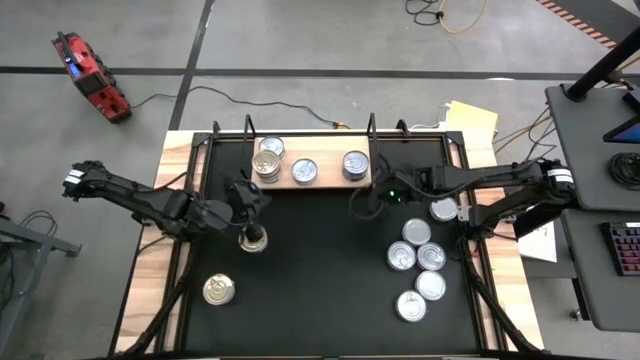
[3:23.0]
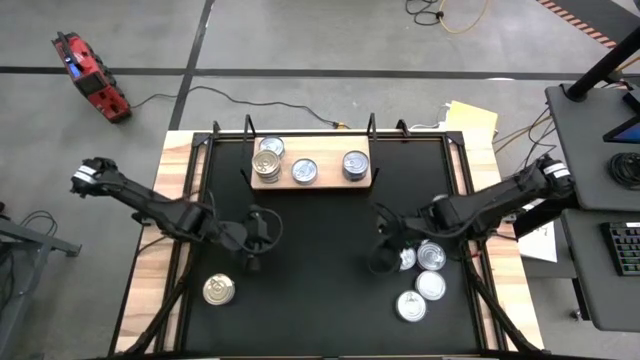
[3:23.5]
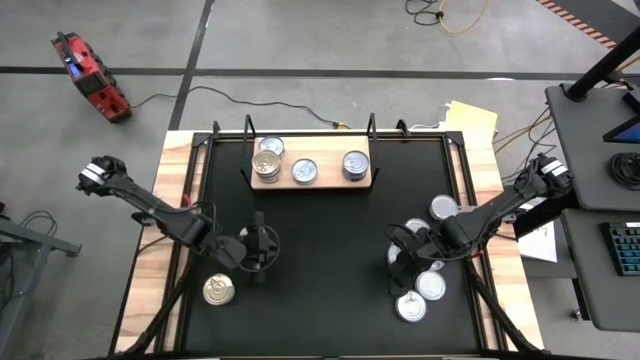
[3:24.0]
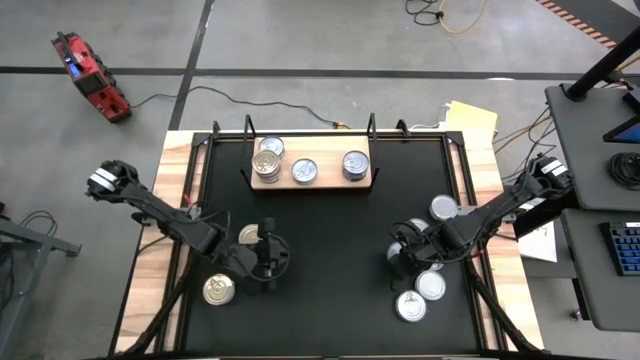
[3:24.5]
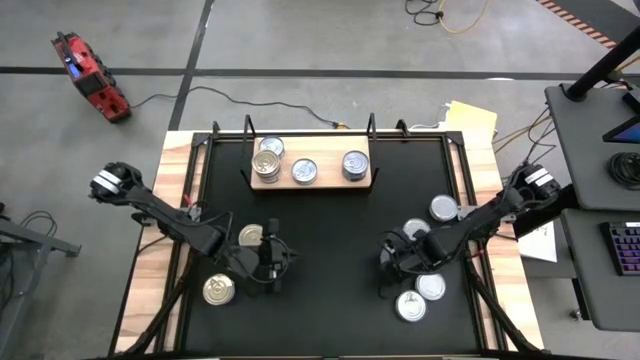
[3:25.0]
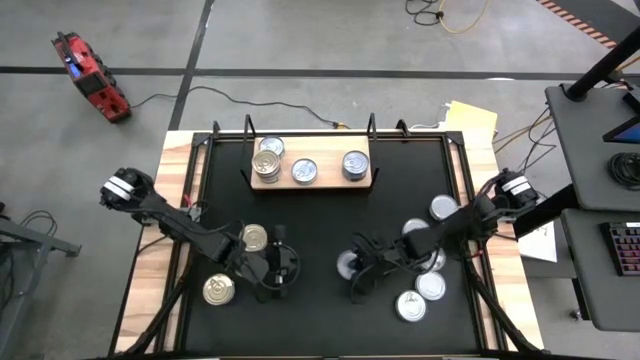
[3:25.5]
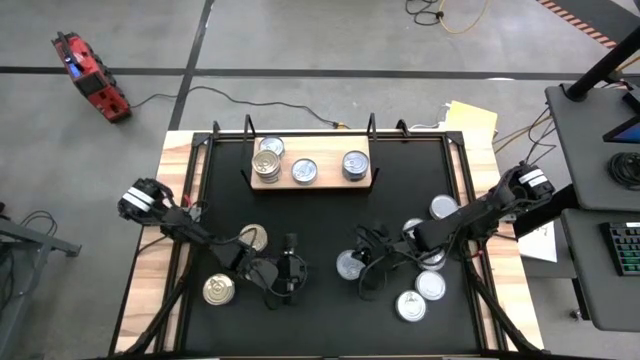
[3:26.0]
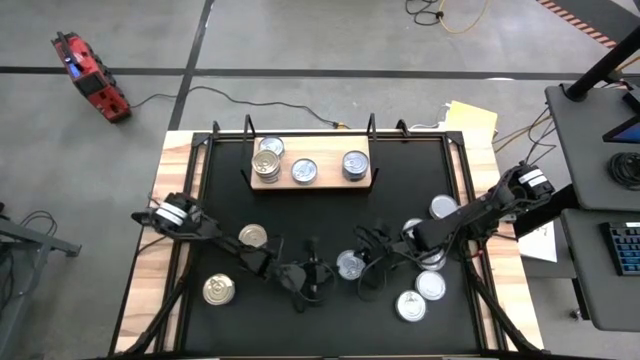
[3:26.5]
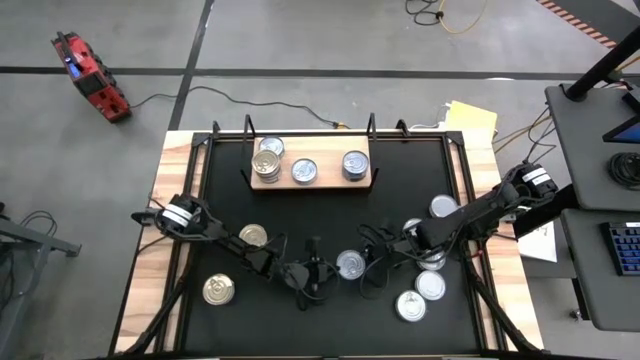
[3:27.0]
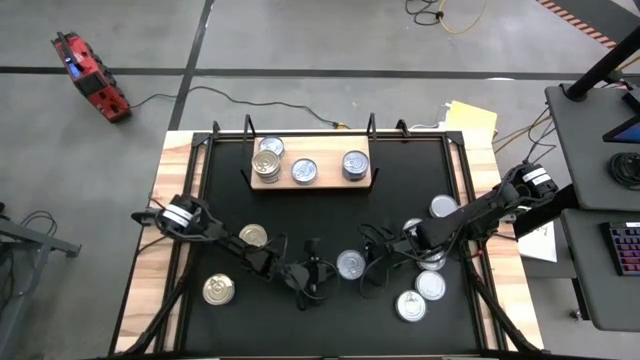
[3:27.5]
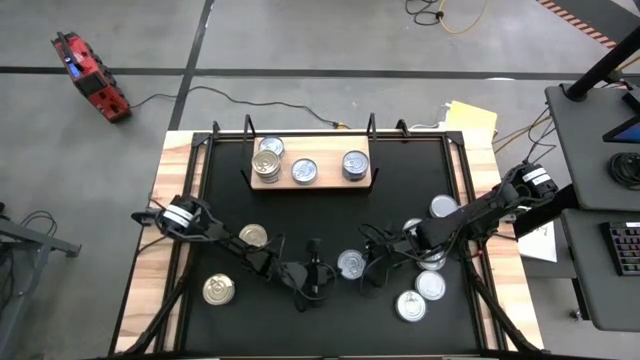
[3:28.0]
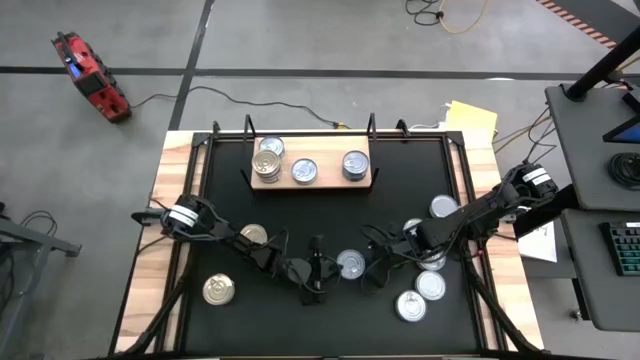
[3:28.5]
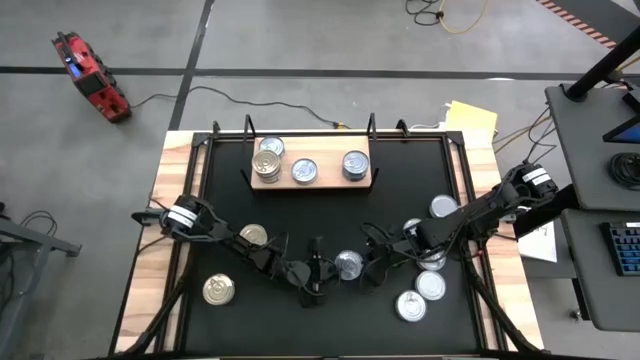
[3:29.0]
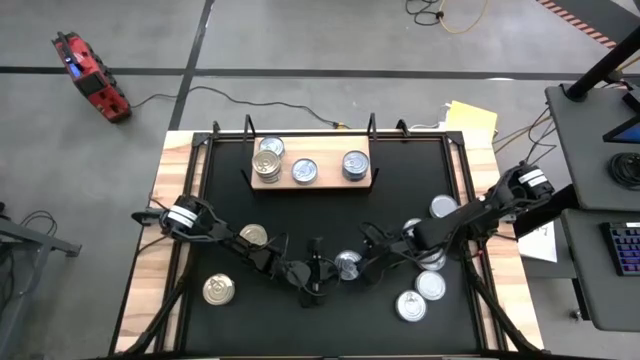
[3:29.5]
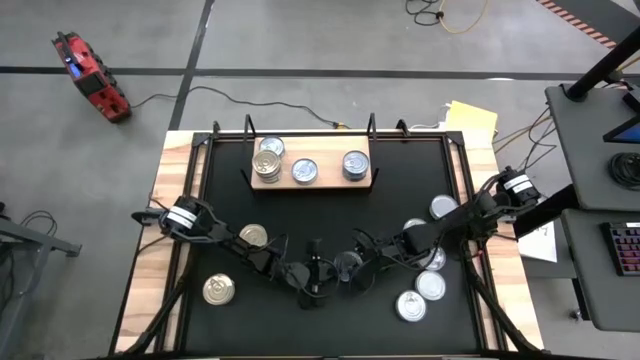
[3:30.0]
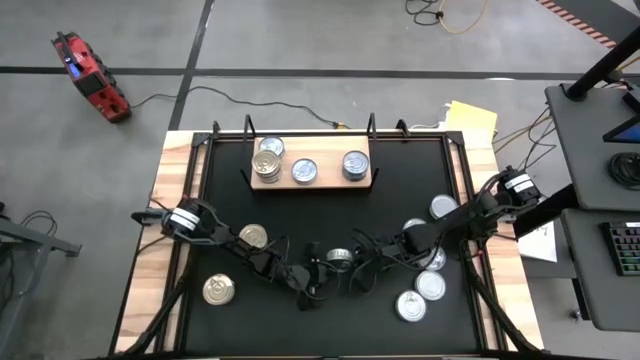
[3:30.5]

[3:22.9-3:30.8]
Task: Stack canned seafood by type on shelf
Put the green tuna can on the shelf

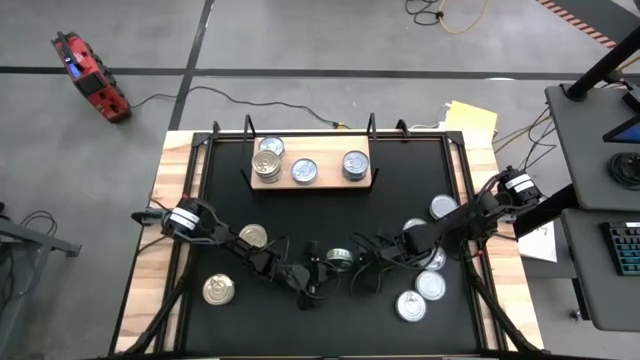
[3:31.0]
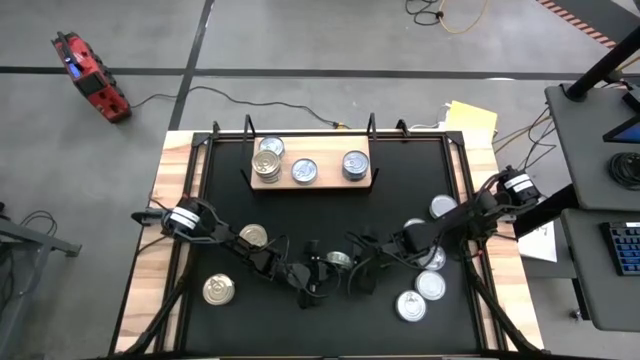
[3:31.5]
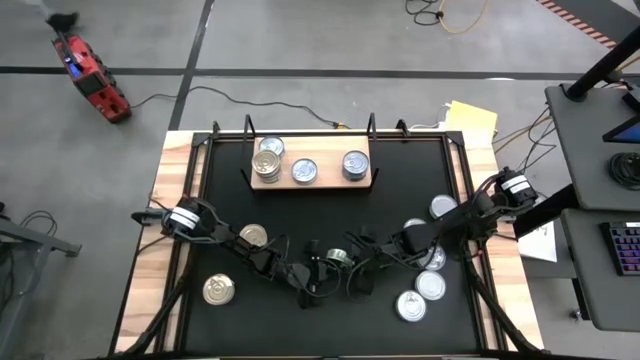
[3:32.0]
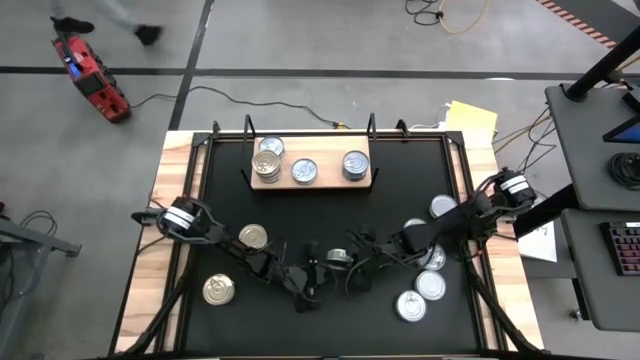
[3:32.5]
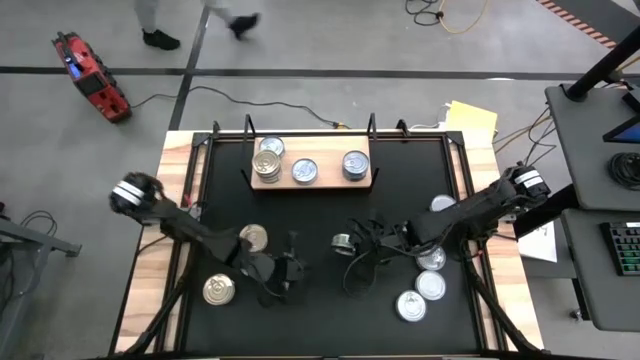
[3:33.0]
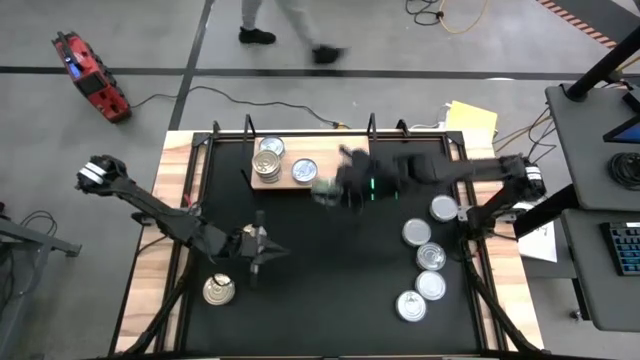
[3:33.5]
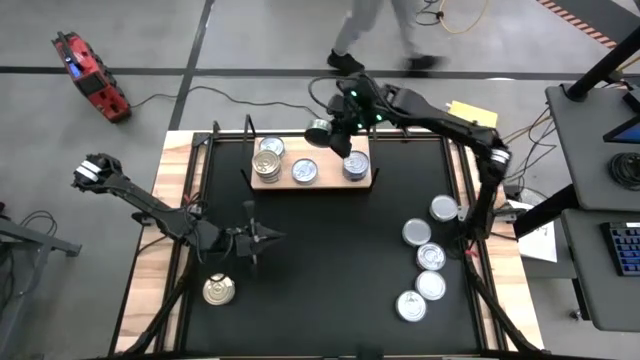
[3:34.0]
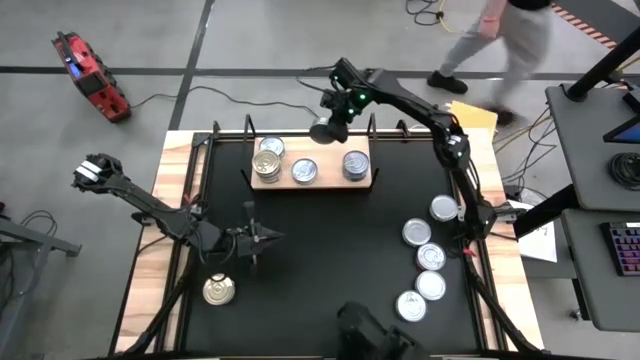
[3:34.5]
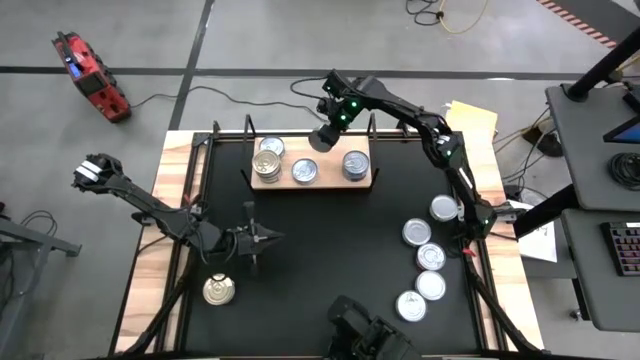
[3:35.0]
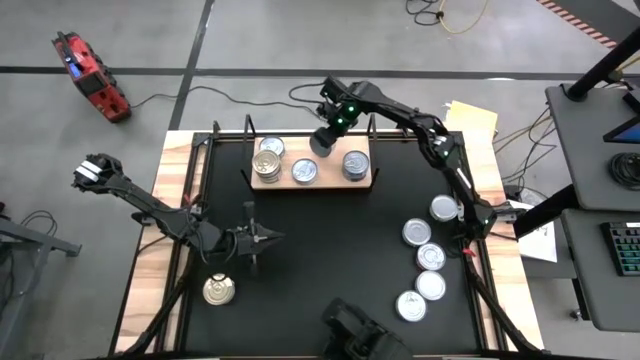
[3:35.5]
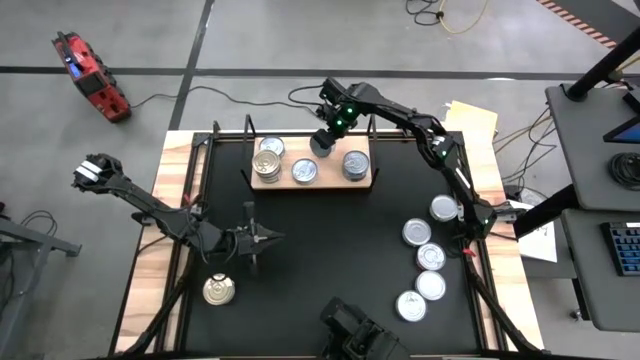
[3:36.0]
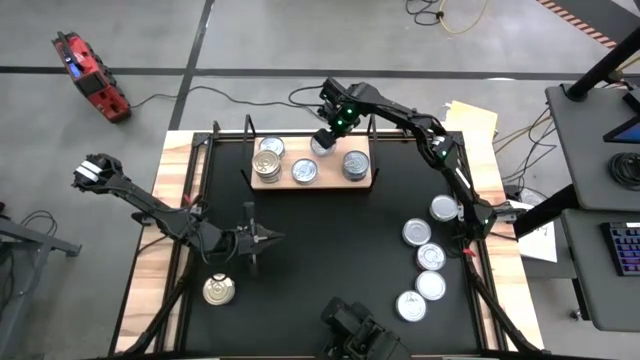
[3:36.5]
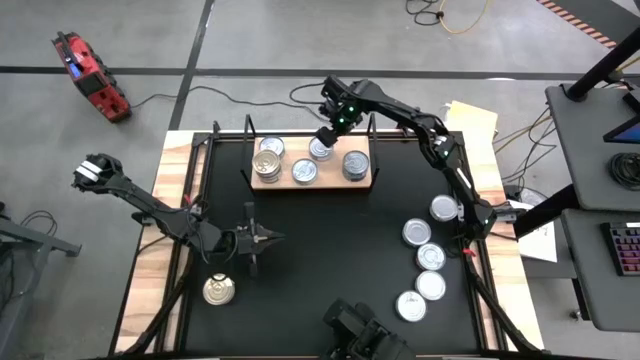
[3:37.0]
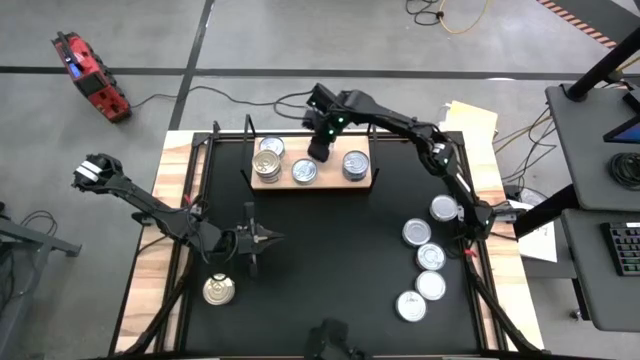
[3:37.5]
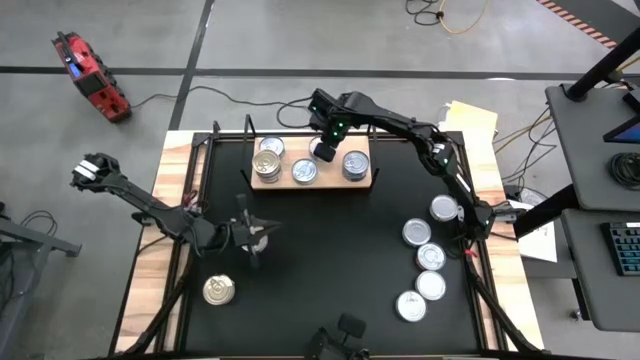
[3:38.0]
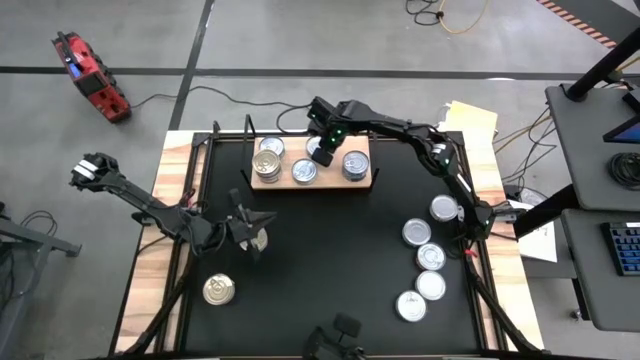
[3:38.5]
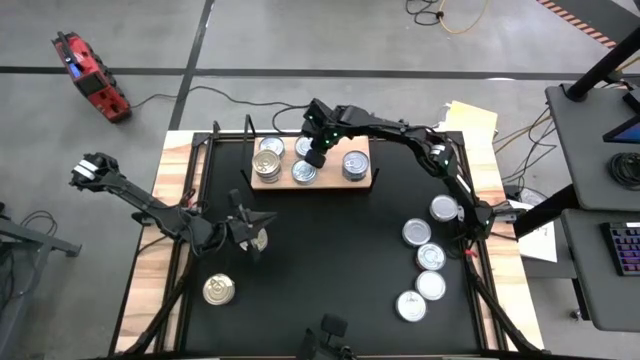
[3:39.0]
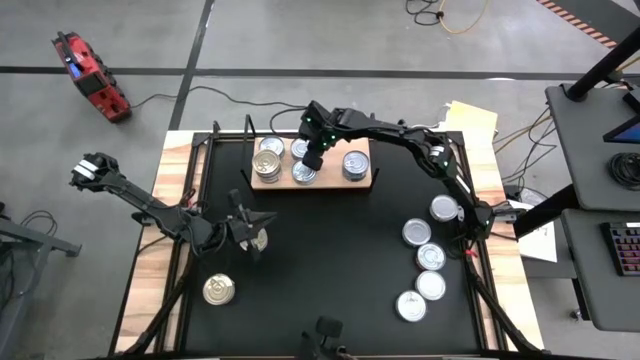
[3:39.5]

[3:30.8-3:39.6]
Put the green tuna can on the shelf

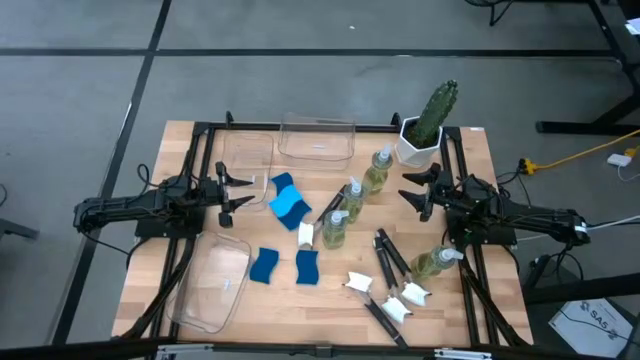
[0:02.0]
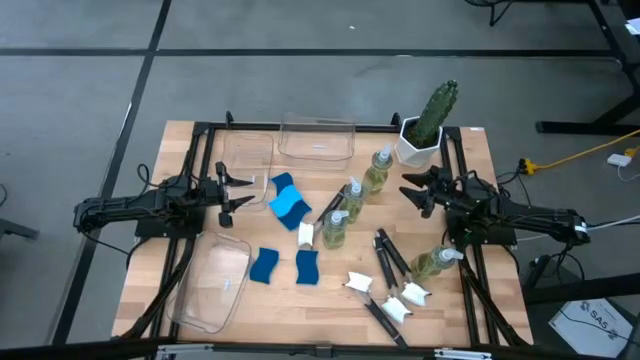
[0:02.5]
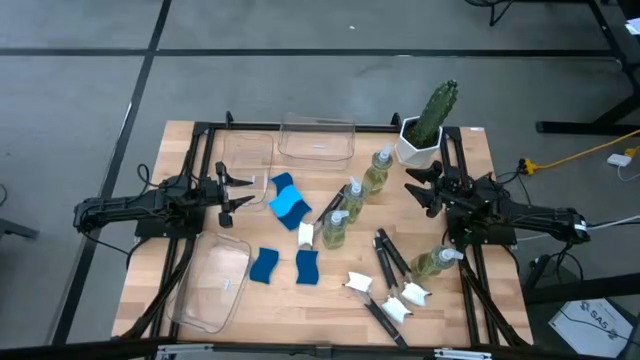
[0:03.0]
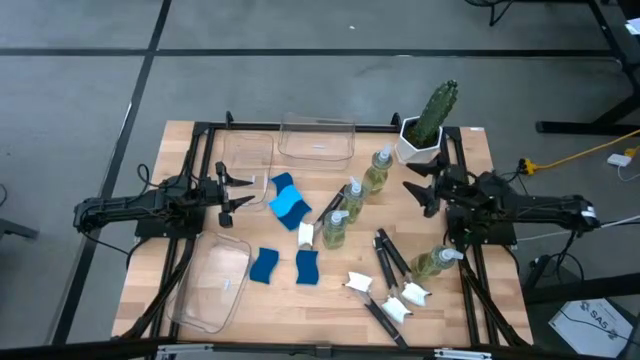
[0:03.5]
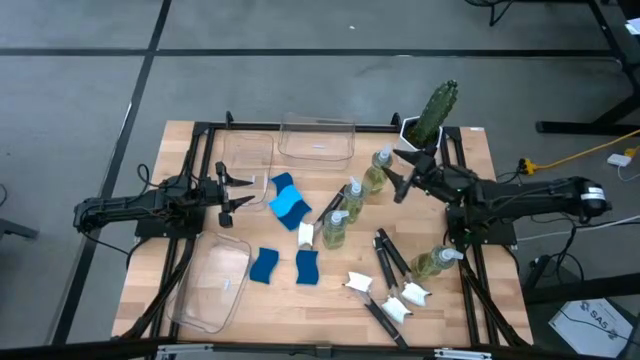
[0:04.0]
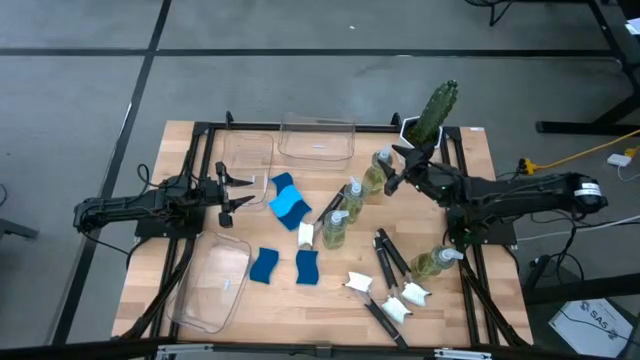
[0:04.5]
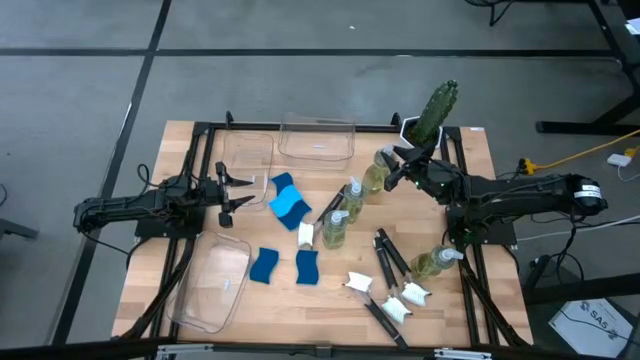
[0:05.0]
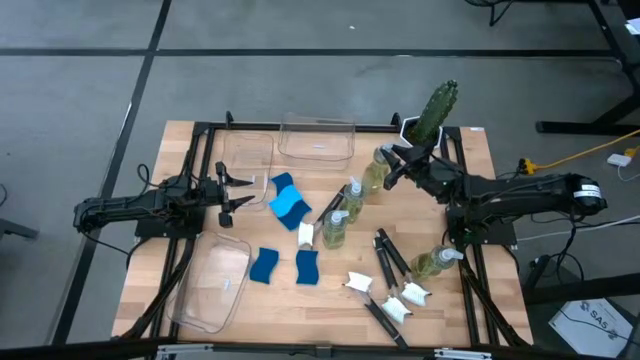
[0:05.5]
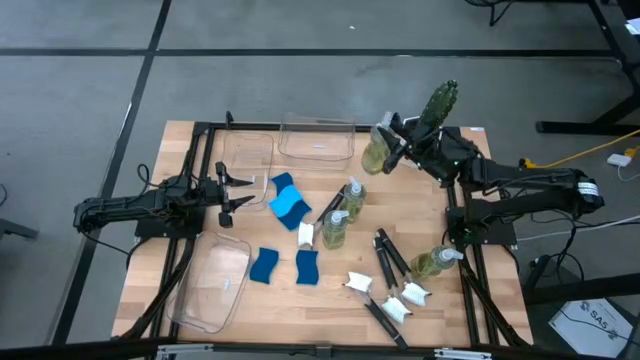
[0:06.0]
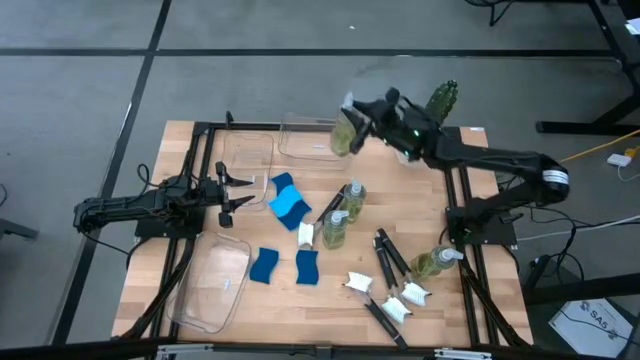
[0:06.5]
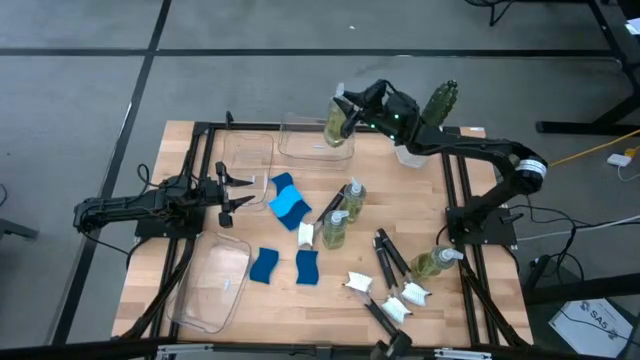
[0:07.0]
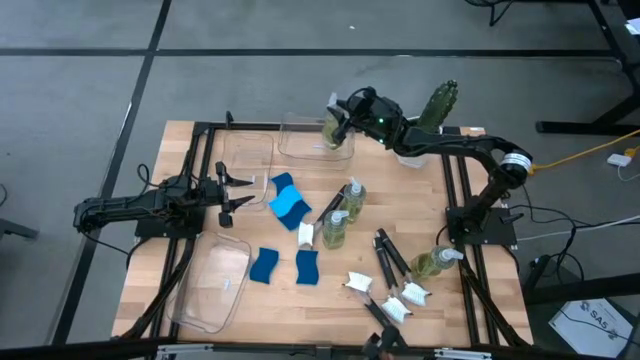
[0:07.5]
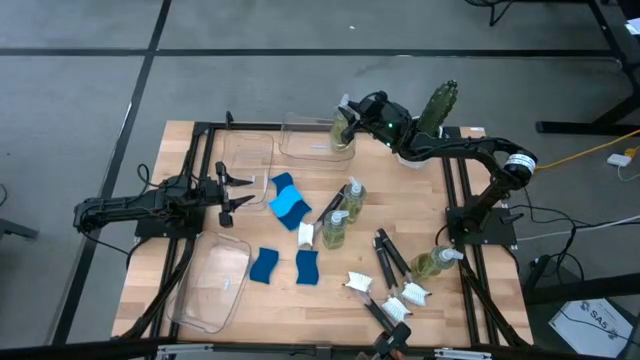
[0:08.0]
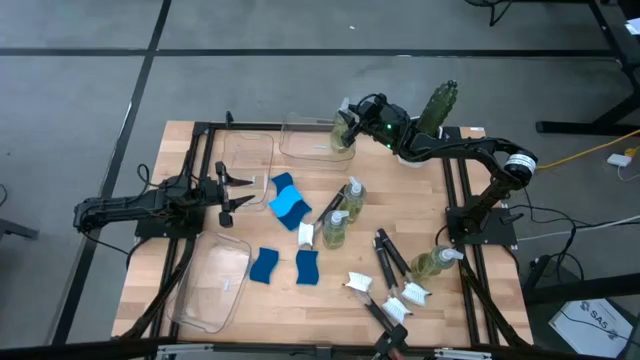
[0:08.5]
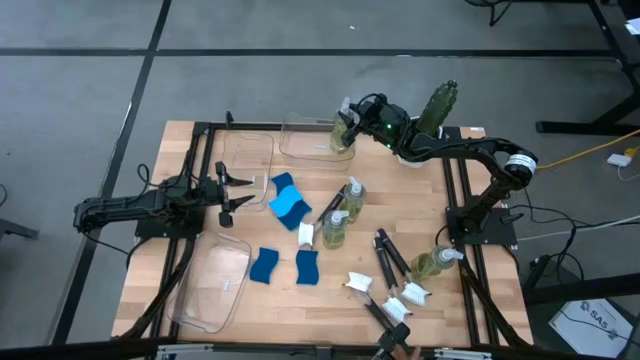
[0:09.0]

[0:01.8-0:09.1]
Task: Pick & Place Kitchen Sink Supplies
Put the yellow soap dispenser bottle into the top right transparent bin
